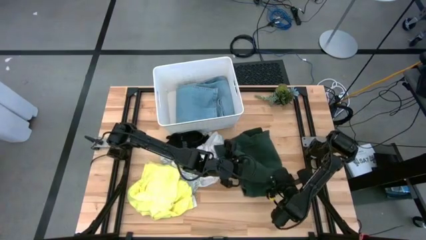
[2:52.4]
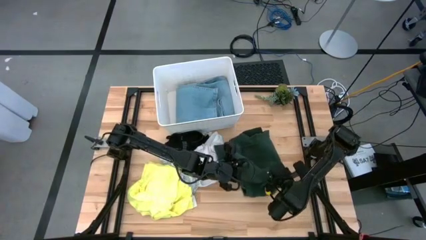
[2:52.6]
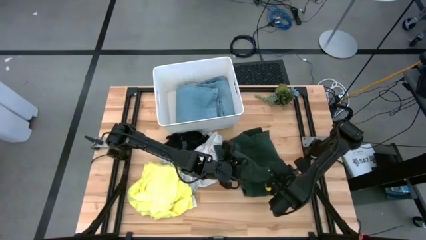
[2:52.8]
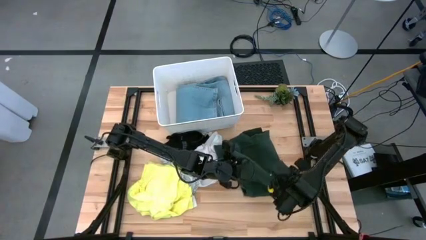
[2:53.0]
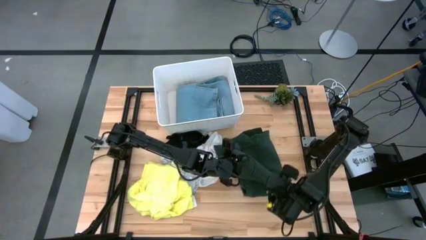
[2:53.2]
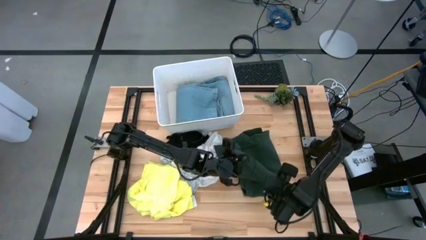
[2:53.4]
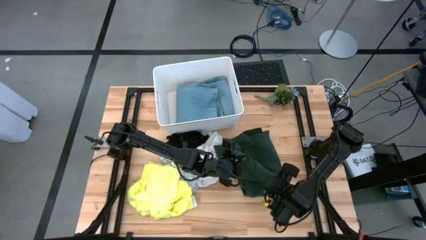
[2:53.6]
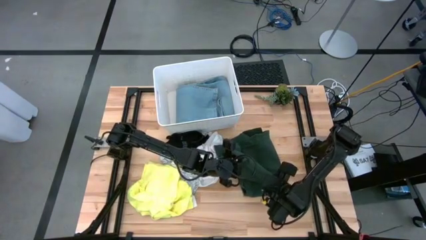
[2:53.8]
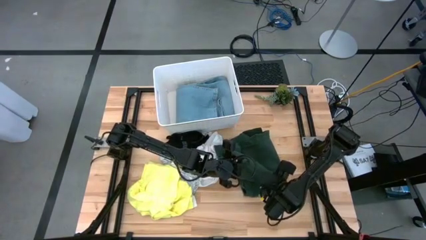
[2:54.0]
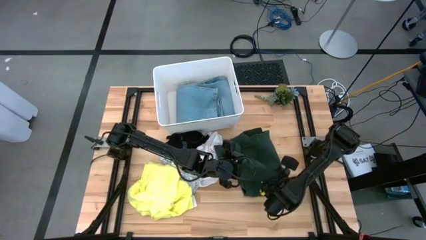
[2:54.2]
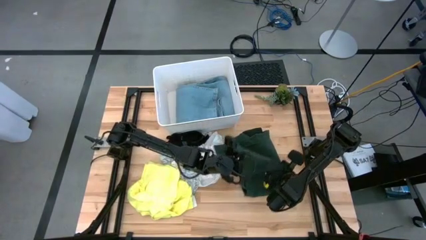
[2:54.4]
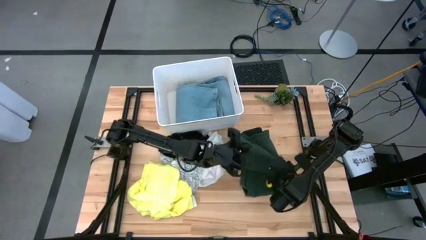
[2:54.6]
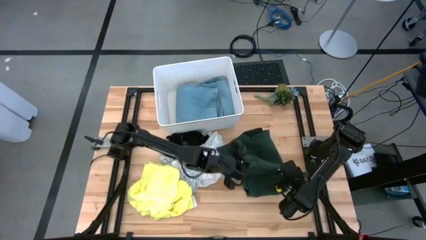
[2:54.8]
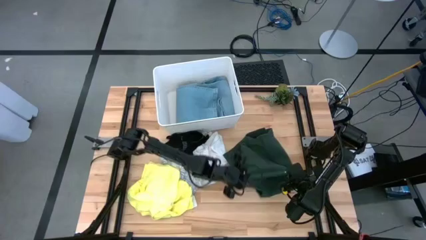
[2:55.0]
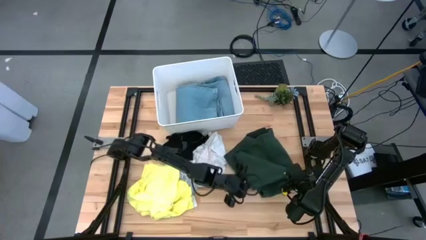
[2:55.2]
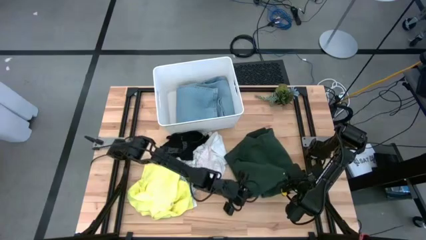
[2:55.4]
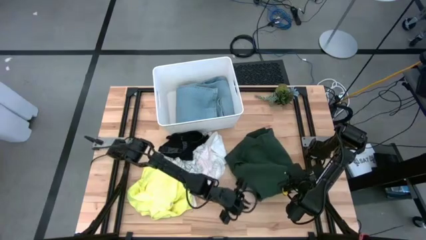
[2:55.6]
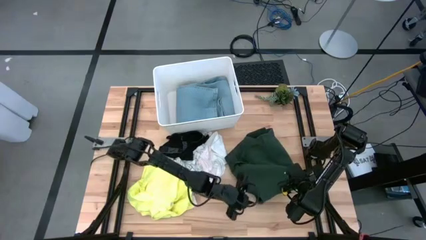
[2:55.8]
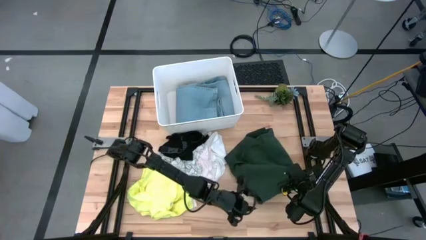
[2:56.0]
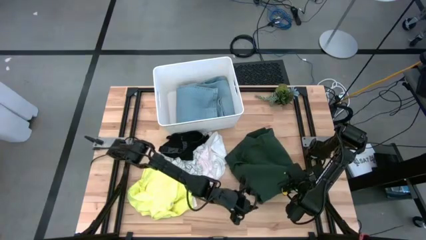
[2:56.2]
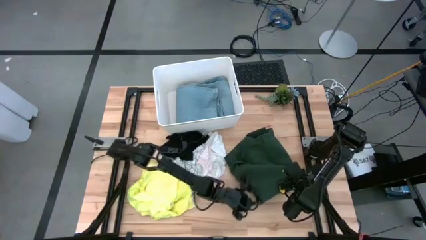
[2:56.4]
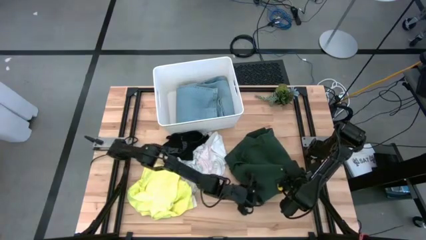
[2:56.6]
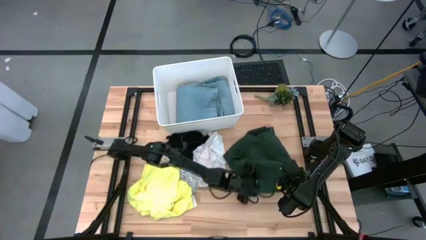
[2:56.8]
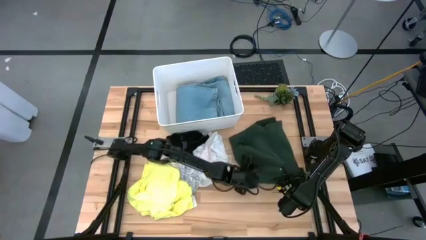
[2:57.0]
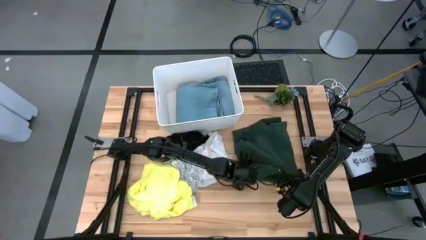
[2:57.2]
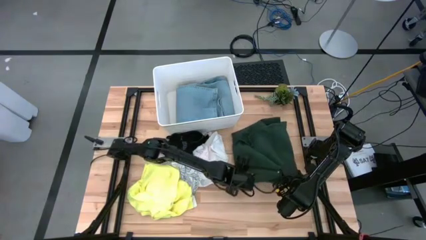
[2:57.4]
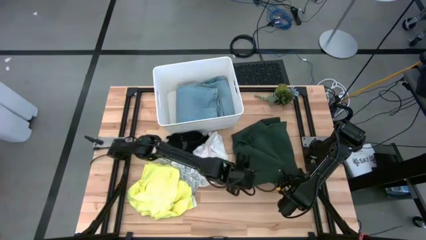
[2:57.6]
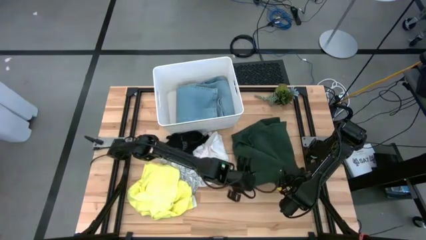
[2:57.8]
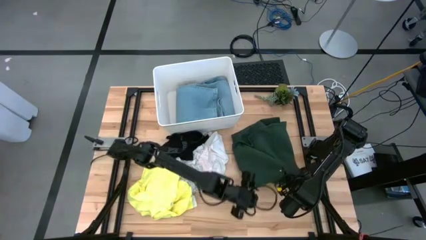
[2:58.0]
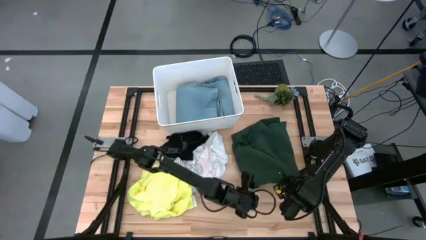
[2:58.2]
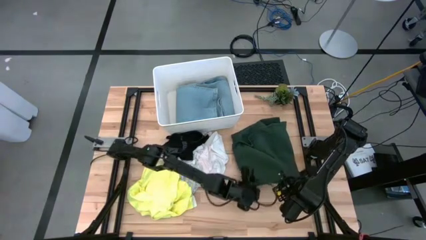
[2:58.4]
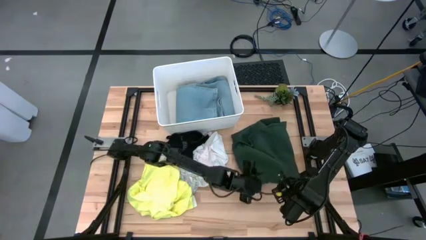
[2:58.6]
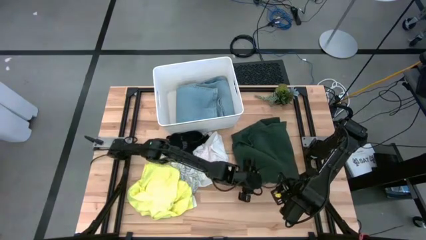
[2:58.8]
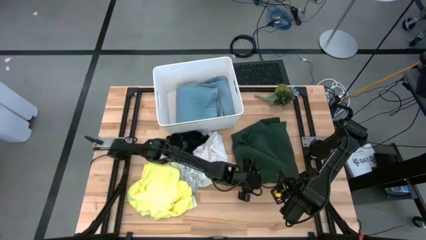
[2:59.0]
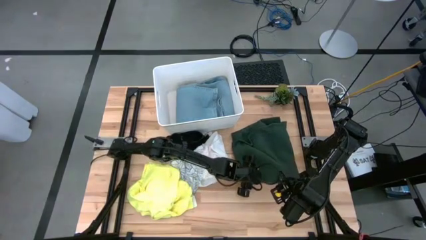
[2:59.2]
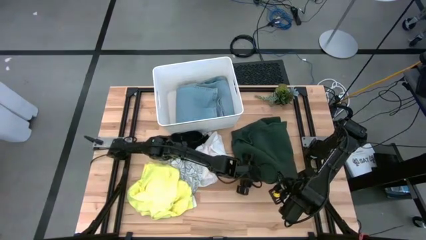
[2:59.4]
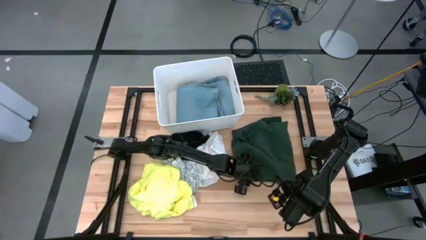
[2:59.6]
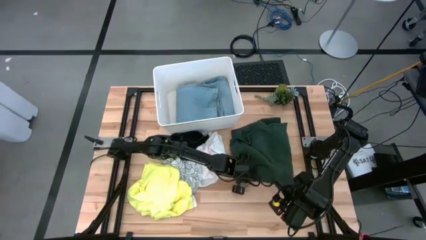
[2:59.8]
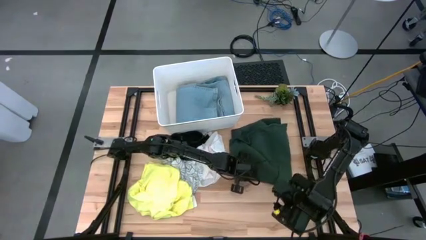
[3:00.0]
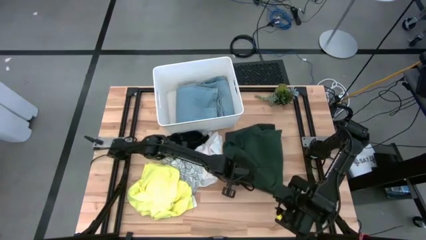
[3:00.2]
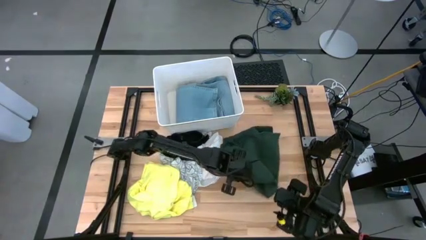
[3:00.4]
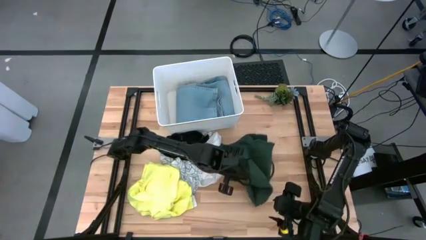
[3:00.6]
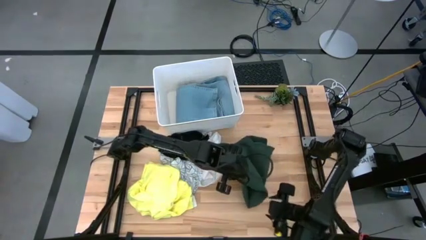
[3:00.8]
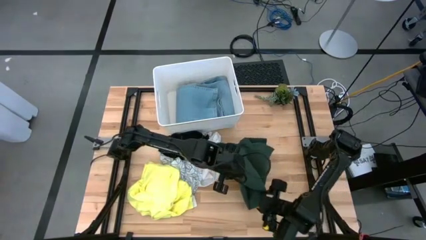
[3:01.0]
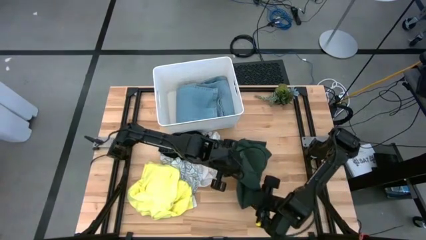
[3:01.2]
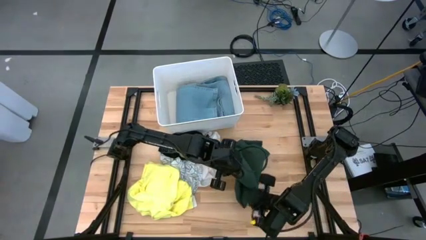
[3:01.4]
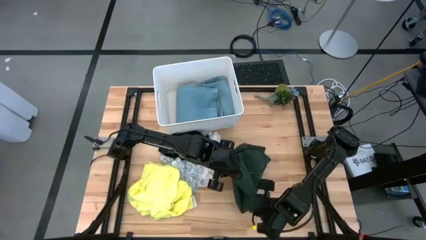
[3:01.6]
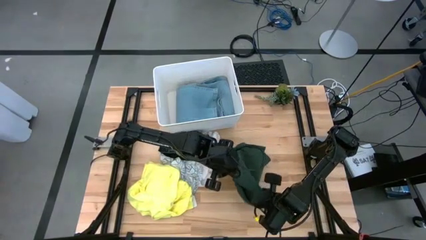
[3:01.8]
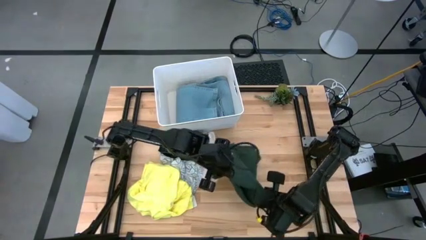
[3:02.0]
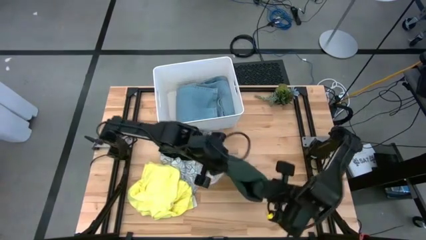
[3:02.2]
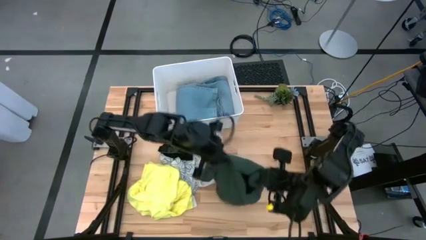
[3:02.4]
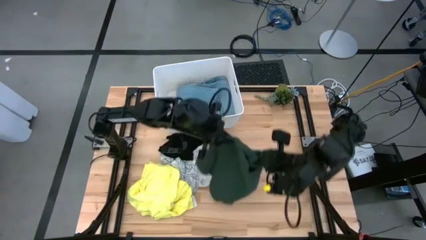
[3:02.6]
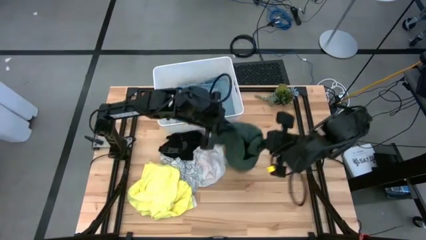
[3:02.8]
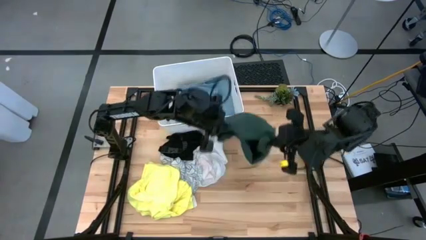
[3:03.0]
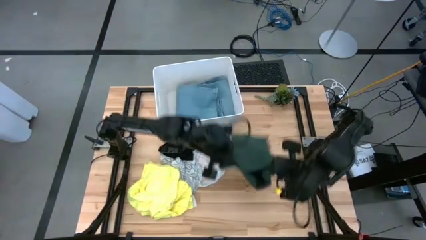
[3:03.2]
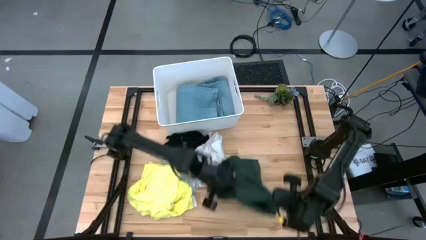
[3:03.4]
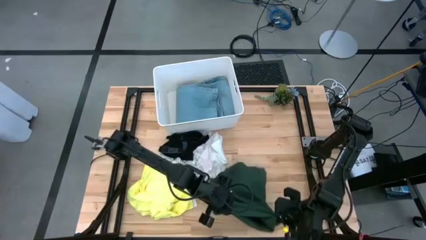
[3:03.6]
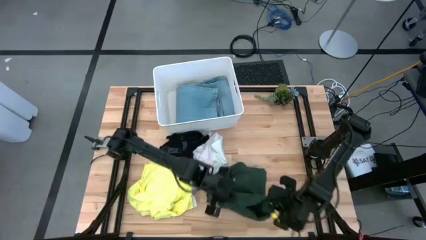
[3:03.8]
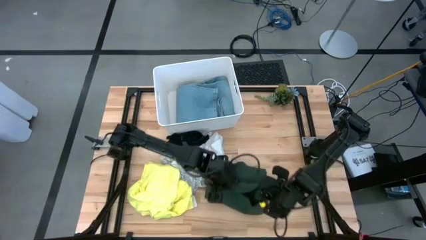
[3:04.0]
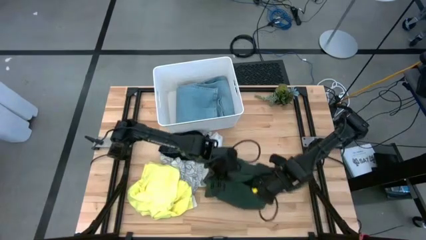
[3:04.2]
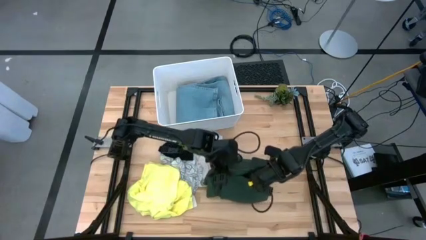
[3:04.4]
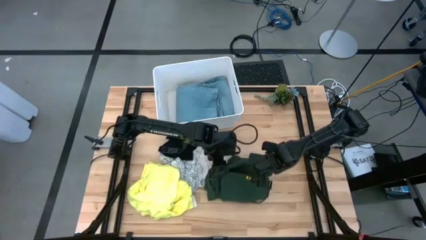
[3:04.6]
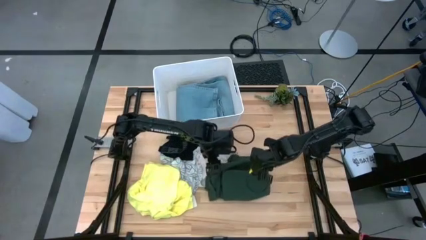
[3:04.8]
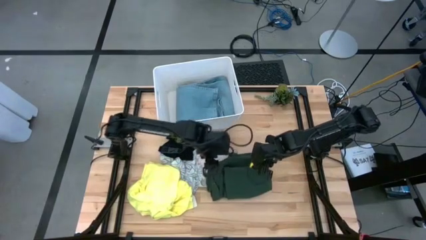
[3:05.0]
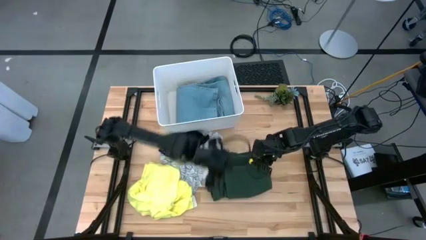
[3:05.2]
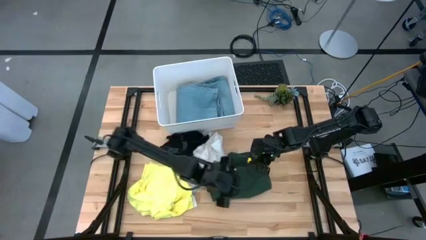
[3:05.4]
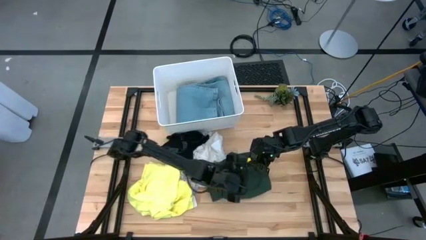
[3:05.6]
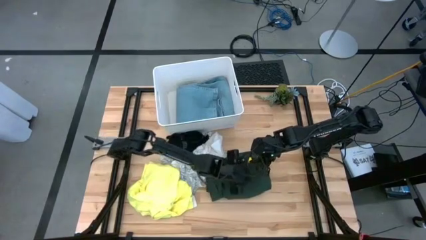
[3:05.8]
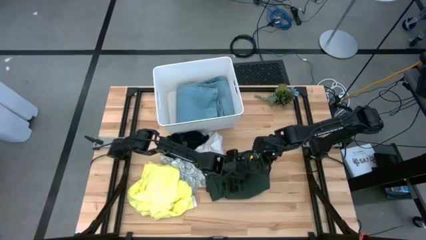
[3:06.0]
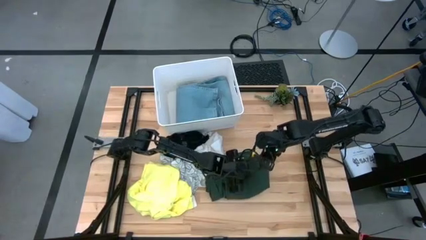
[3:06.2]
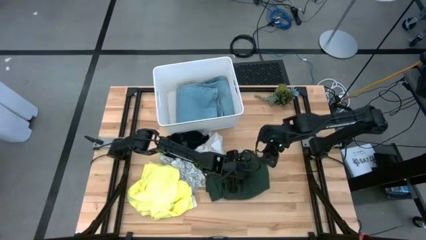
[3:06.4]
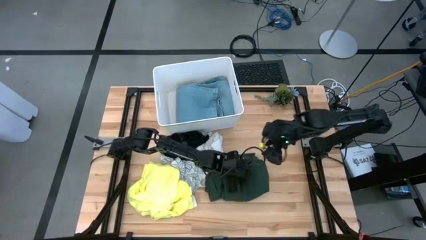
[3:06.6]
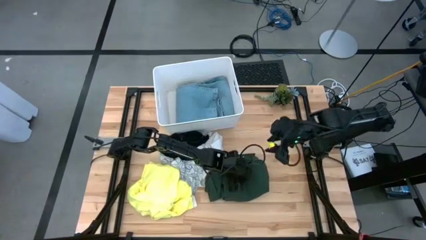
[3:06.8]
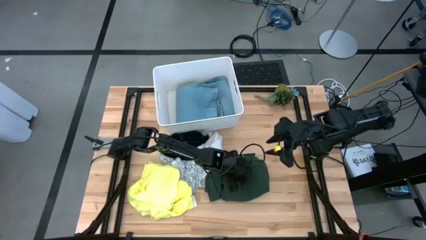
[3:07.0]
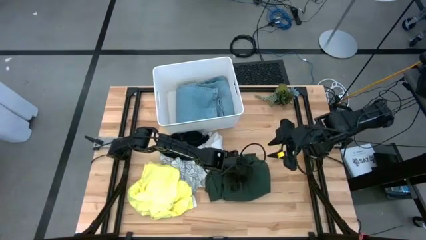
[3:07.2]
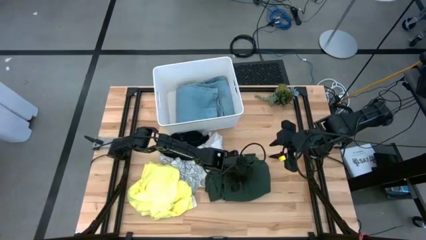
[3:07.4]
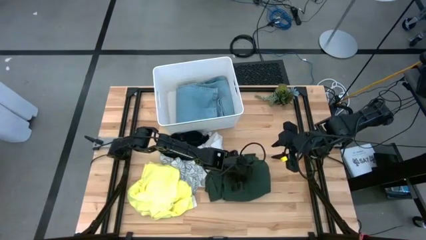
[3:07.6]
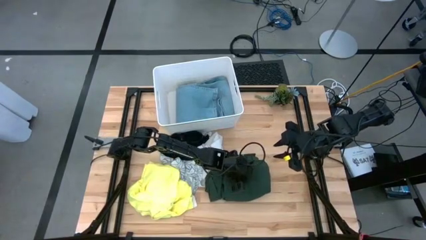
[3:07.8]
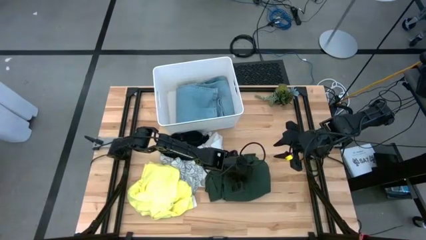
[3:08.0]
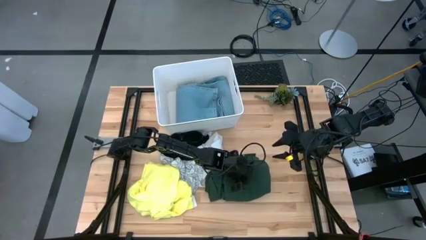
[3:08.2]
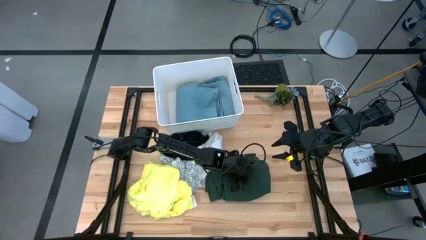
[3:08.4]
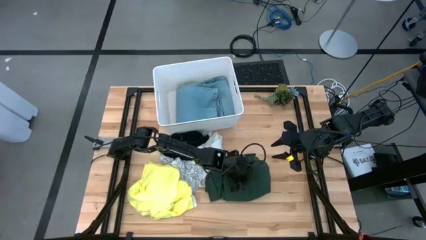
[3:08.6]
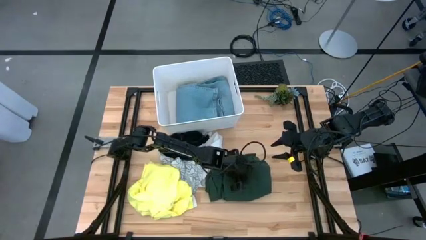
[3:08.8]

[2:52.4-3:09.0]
Task: Fold laundry
Fold the green polo shirt
